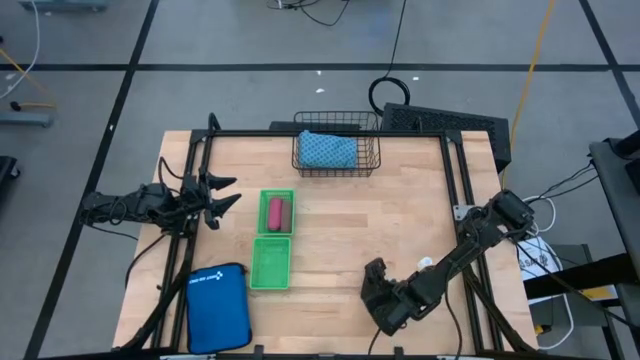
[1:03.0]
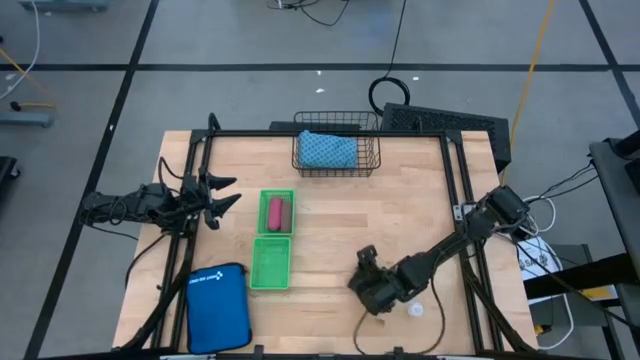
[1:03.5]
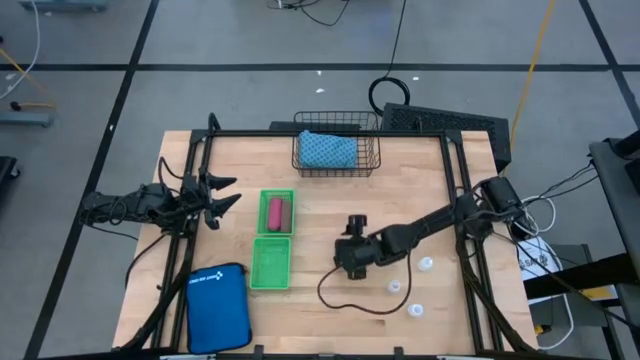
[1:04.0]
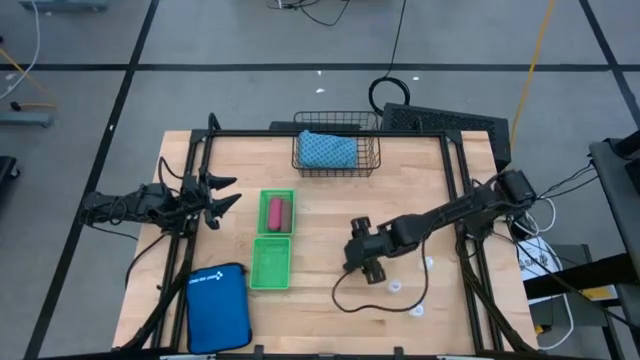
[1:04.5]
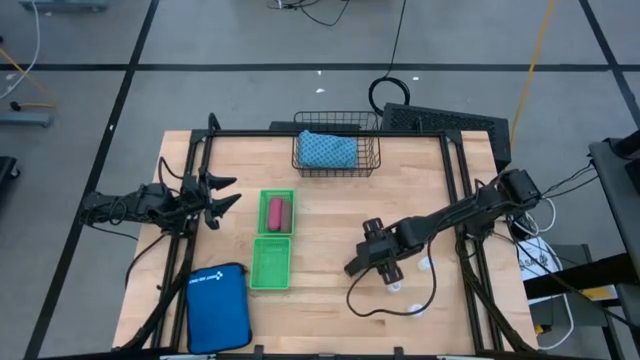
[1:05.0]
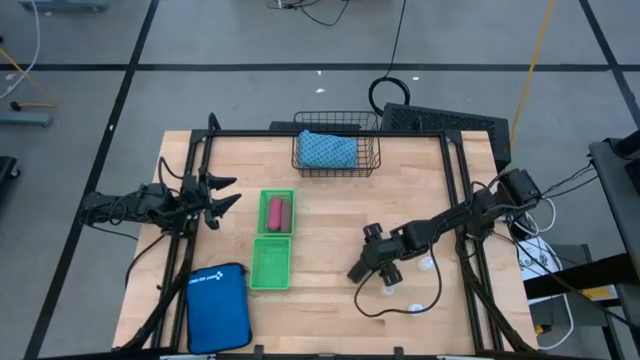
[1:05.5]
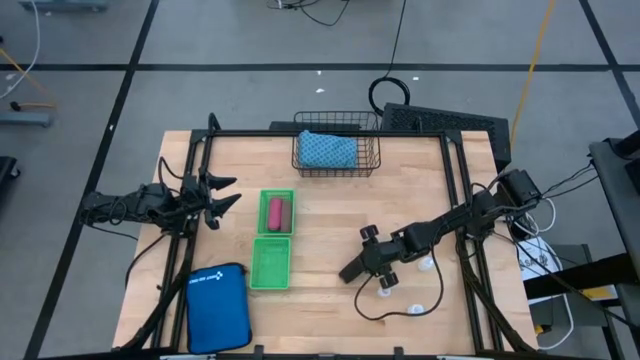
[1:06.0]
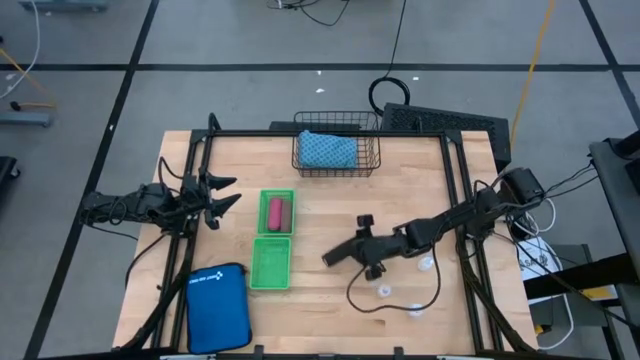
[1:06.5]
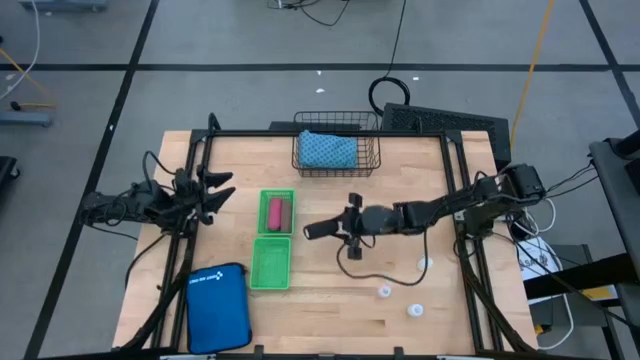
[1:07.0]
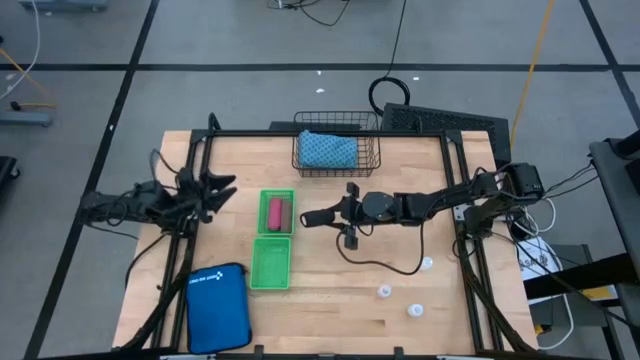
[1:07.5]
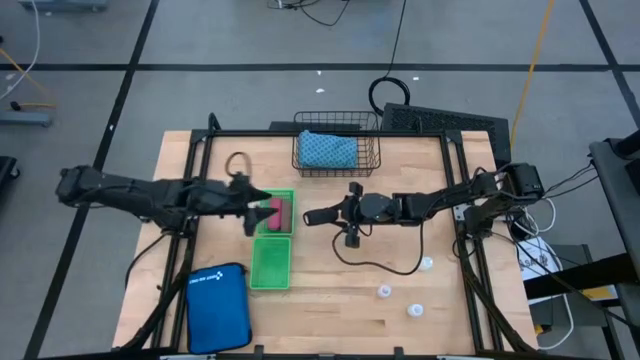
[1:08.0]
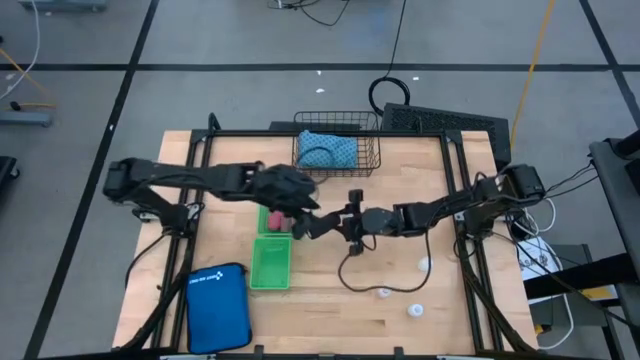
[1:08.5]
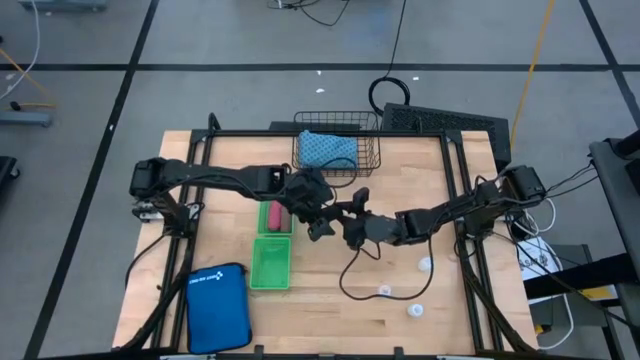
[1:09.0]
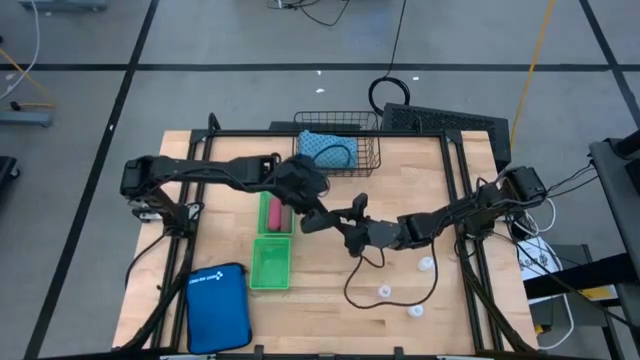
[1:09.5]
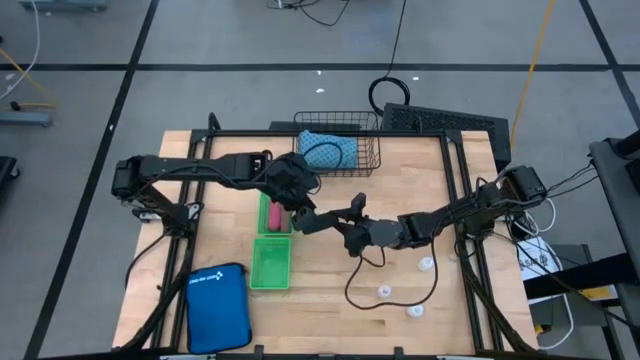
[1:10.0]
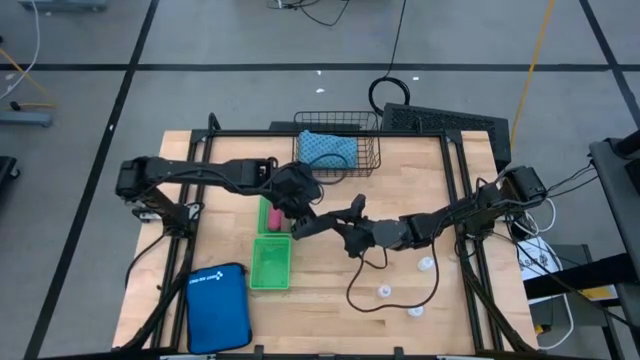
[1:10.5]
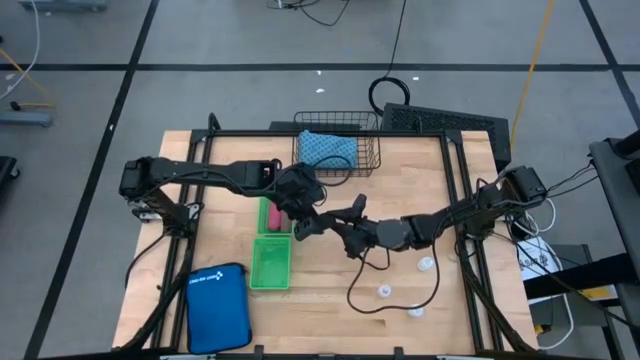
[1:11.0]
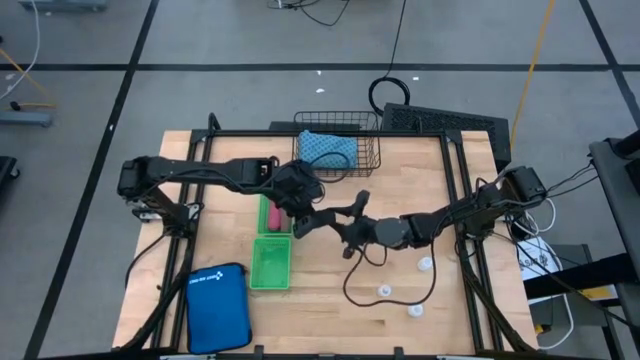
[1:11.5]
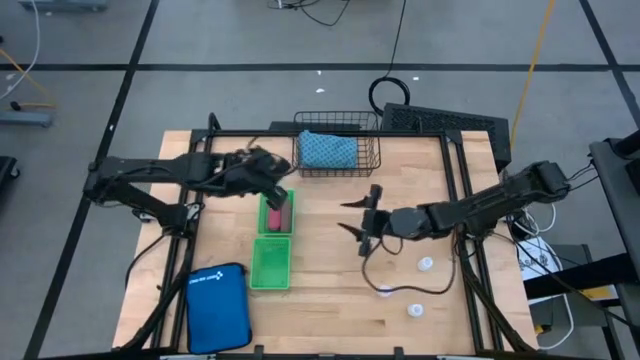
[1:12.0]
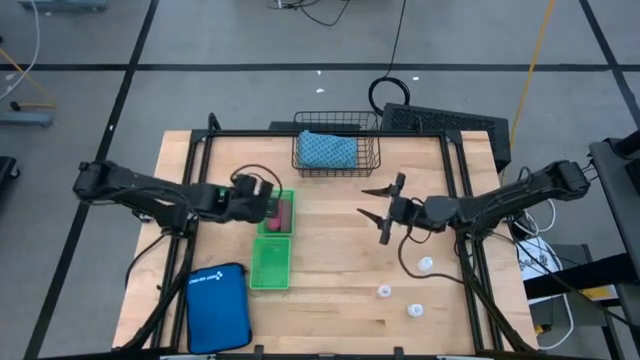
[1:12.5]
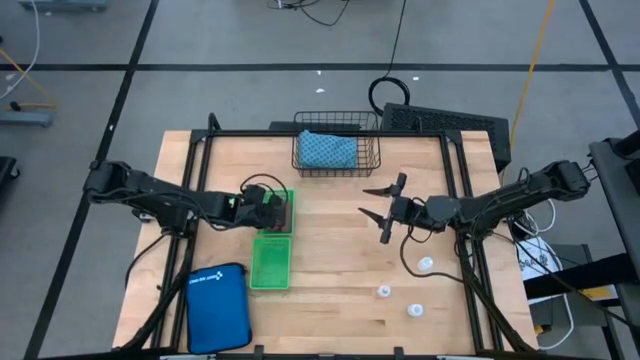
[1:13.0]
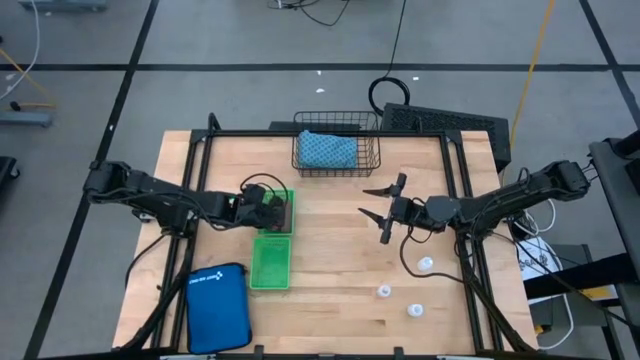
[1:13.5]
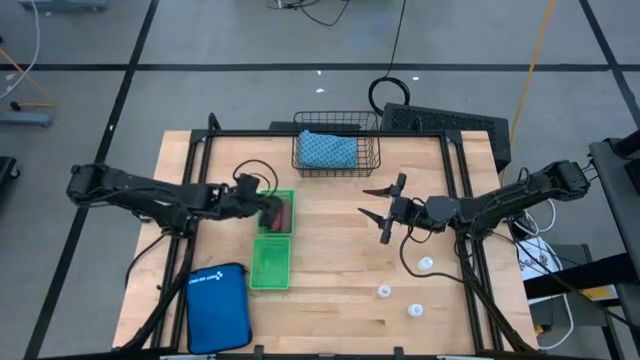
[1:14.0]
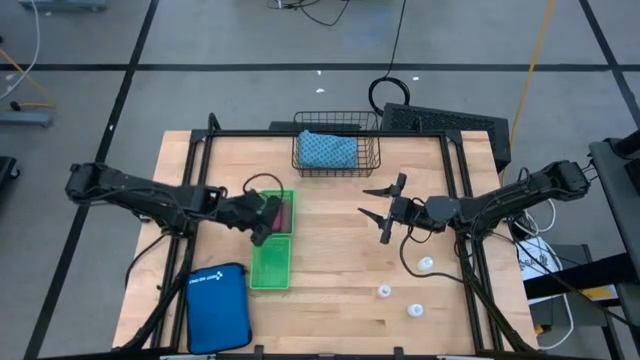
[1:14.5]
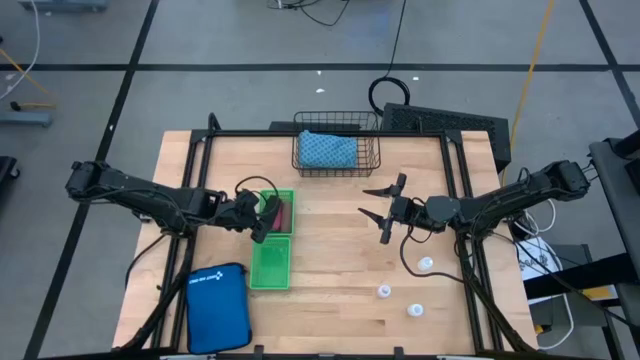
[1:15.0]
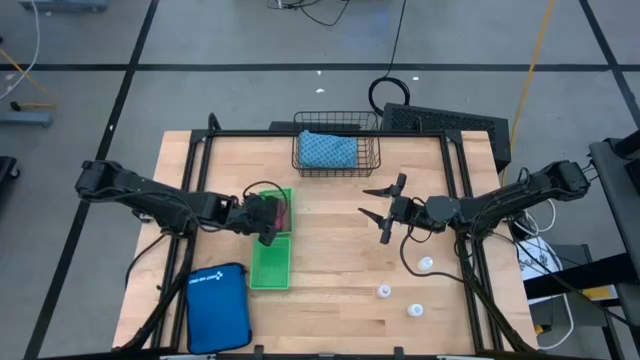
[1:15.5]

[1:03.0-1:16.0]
Task: Pick & Place Medicine items
Put the black bandage into the top green bin

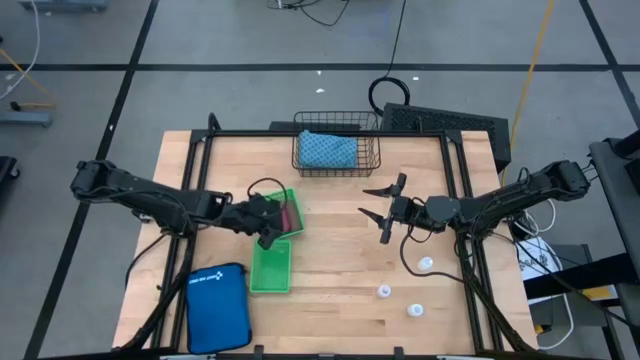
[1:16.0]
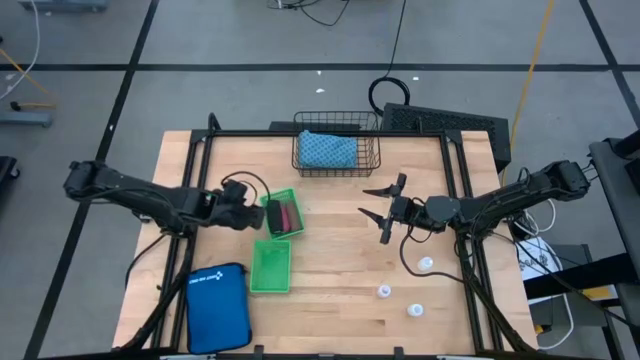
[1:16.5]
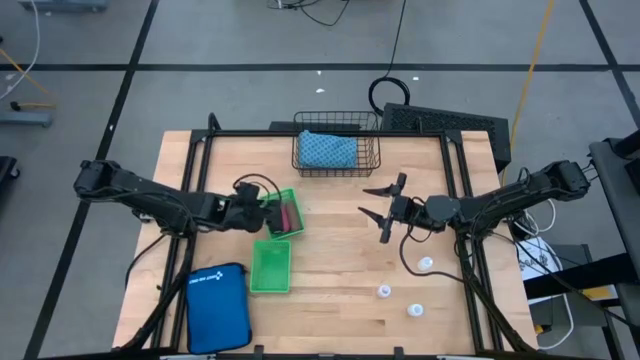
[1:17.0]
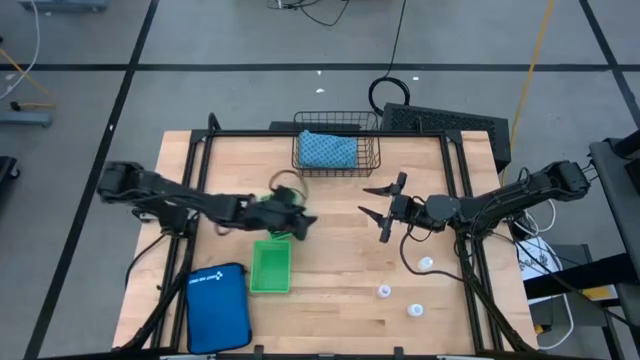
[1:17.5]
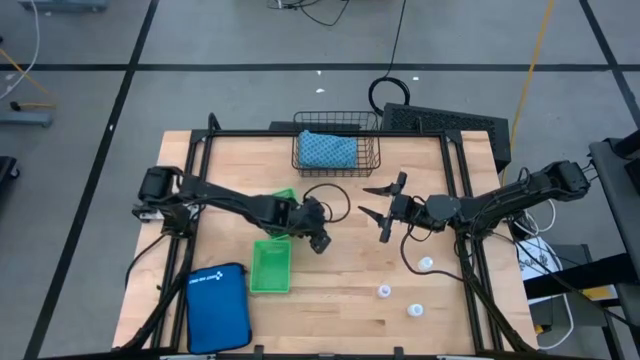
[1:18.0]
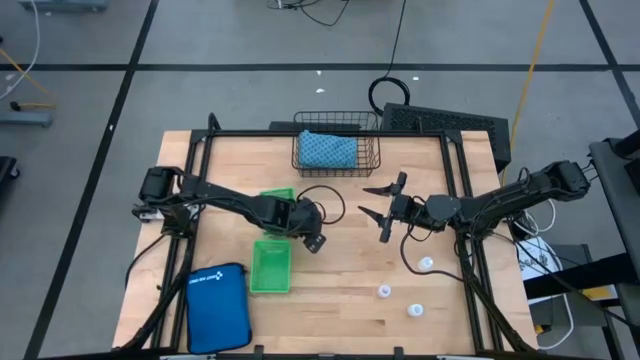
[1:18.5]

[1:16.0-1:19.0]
Adjust the top green bin on the table

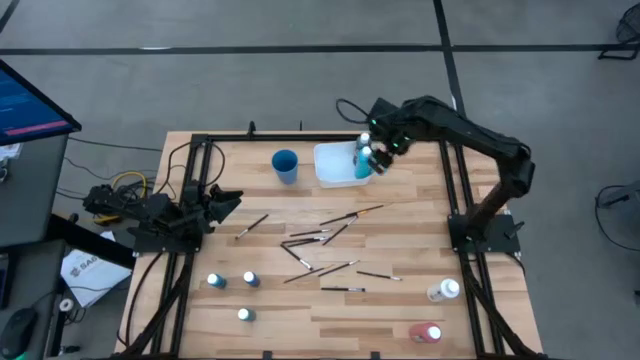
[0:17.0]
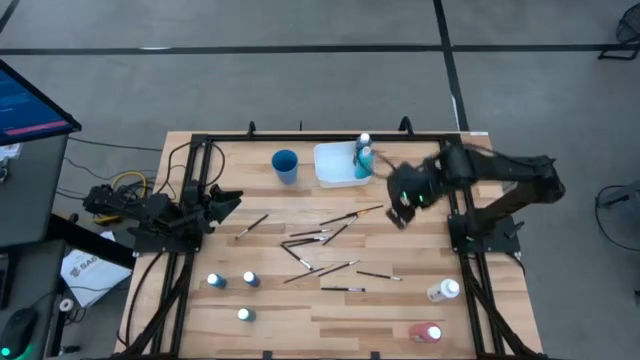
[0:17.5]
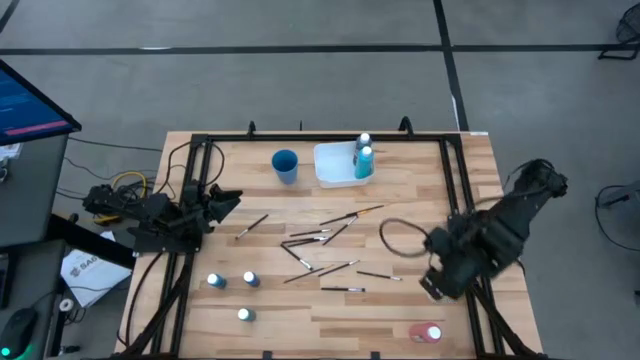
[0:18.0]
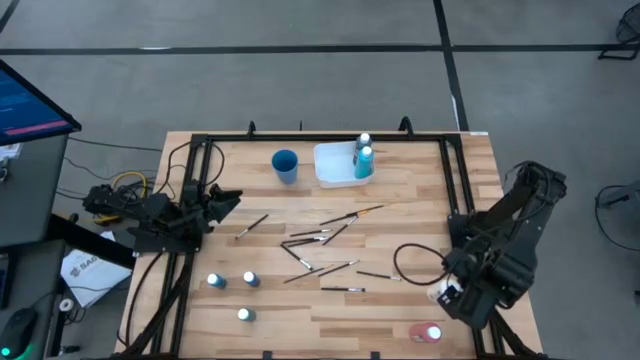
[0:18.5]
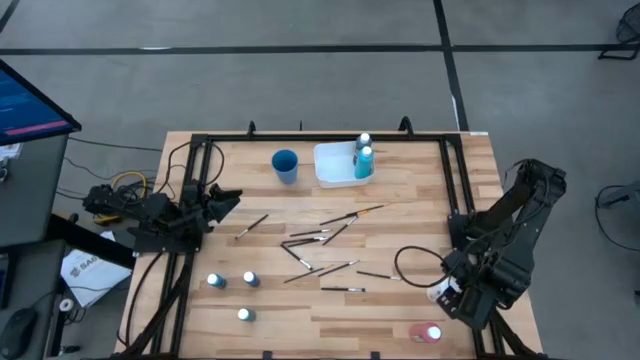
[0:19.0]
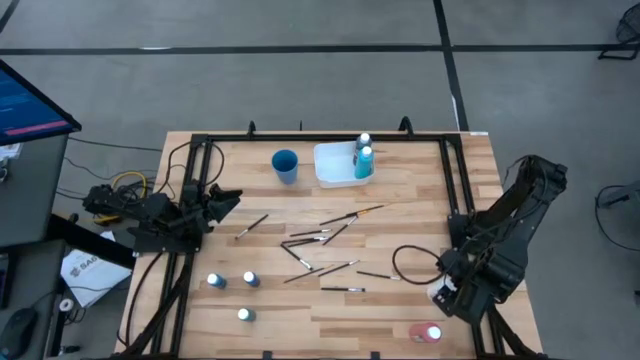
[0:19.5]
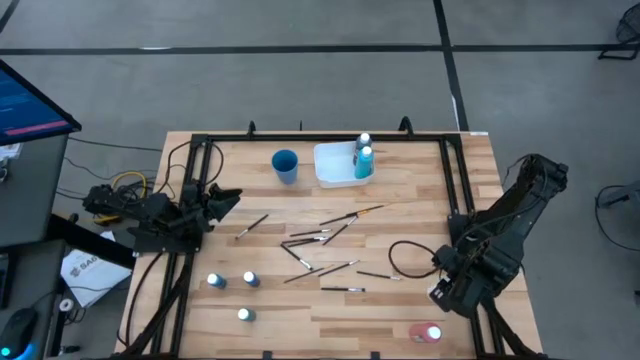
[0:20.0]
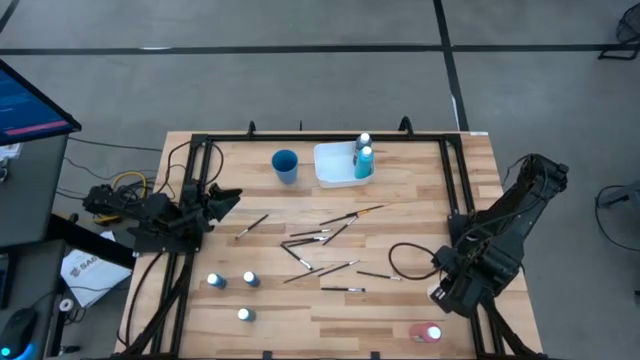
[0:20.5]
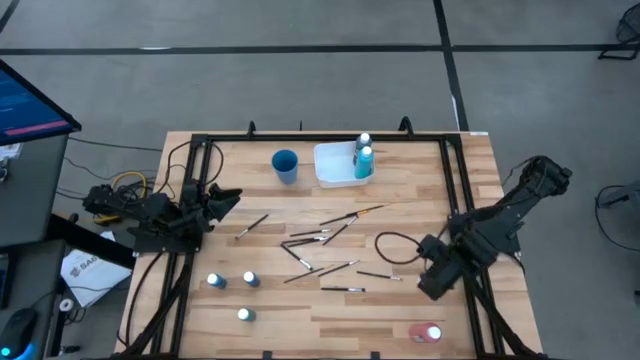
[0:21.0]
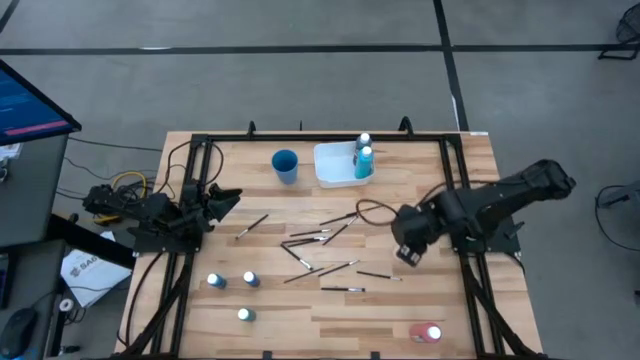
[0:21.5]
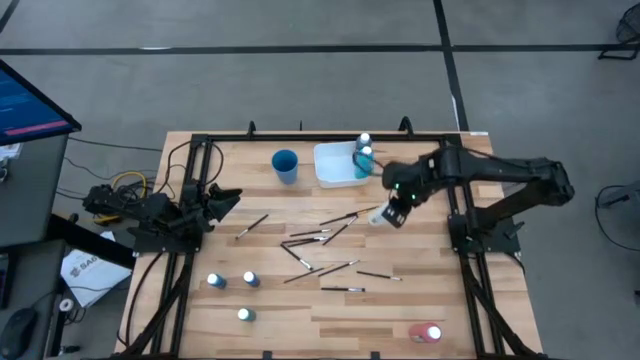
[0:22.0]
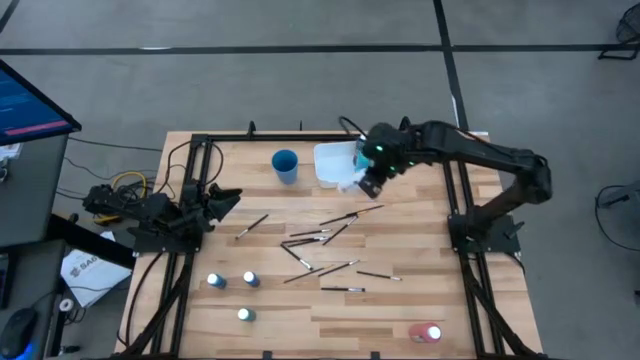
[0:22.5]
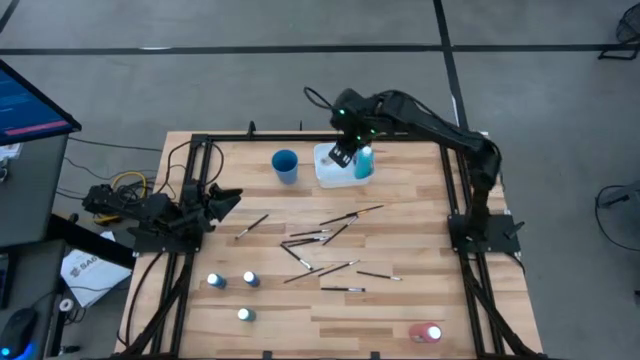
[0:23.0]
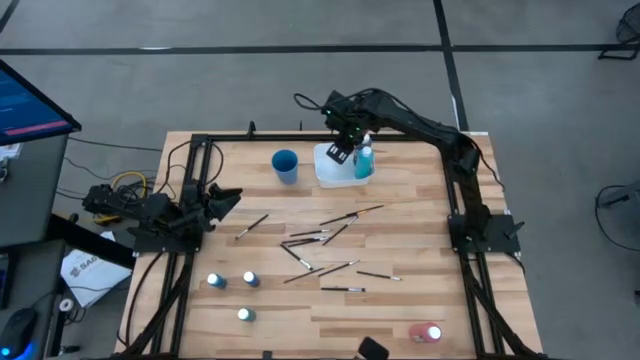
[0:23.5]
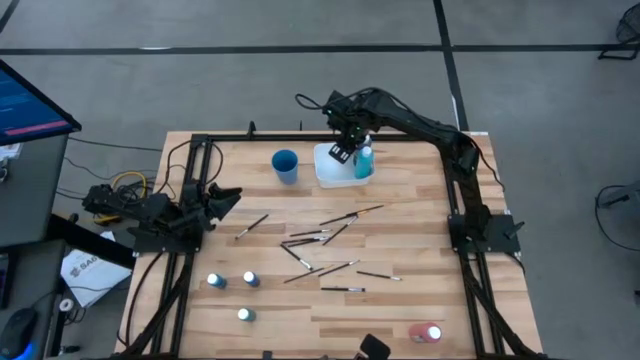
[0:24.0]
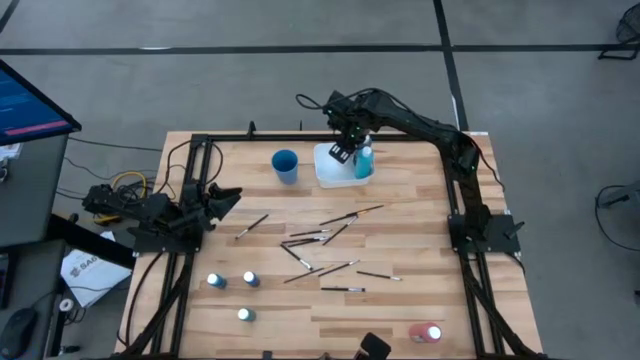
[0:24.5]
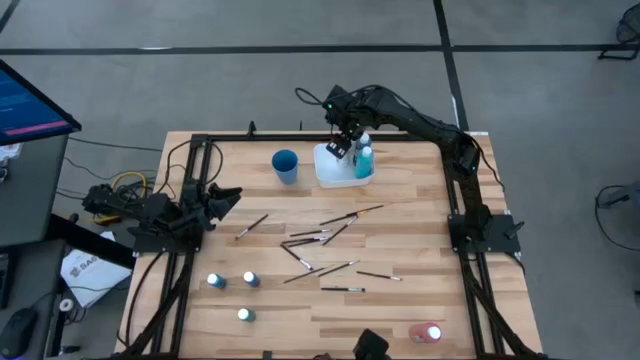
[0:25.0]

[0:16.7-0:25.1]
Task: Pick & Place Paint Supplies
Put the white paint bottle into the white bin
